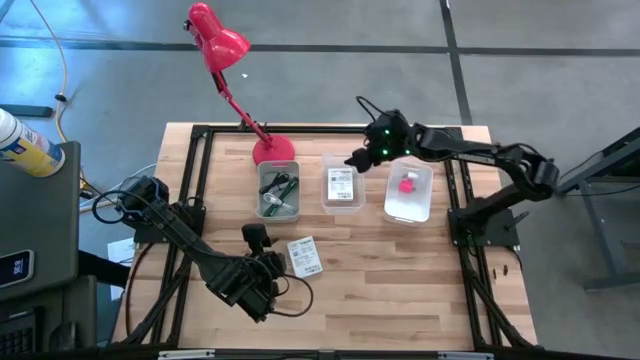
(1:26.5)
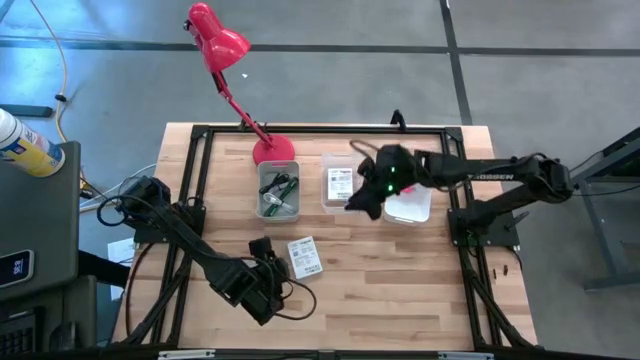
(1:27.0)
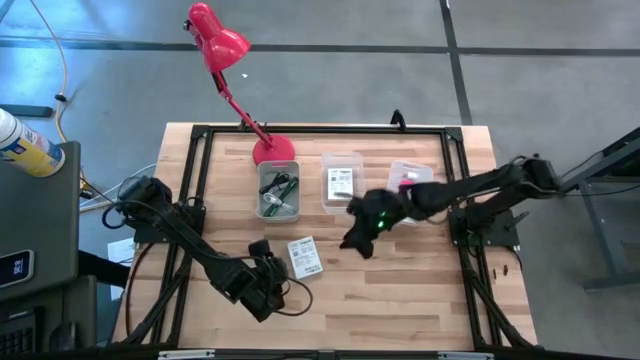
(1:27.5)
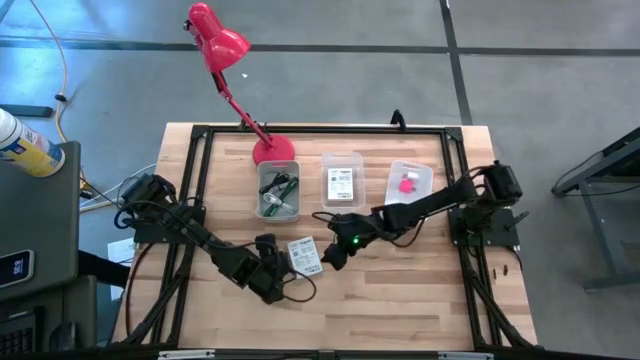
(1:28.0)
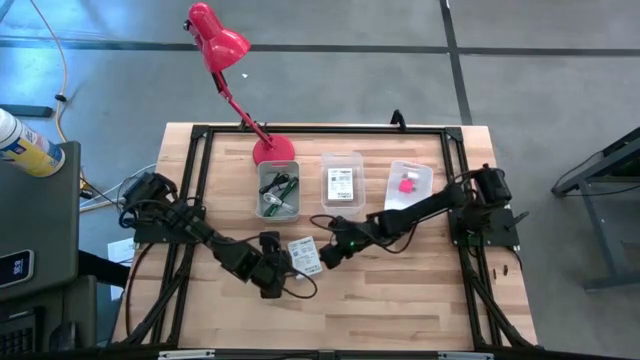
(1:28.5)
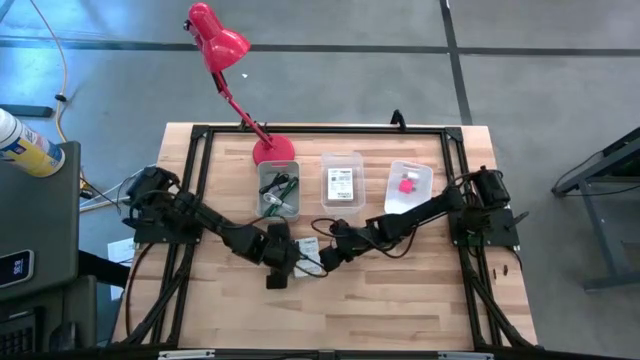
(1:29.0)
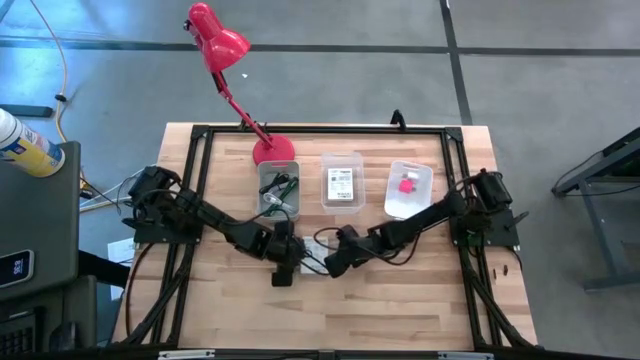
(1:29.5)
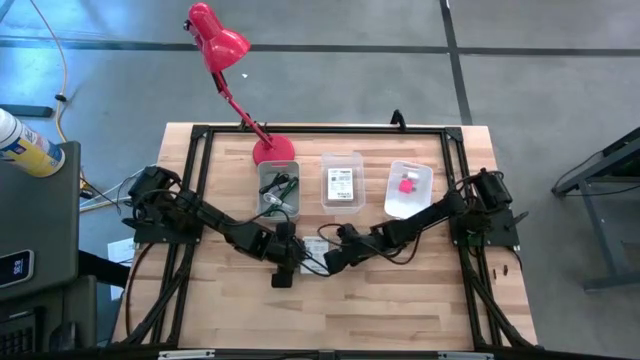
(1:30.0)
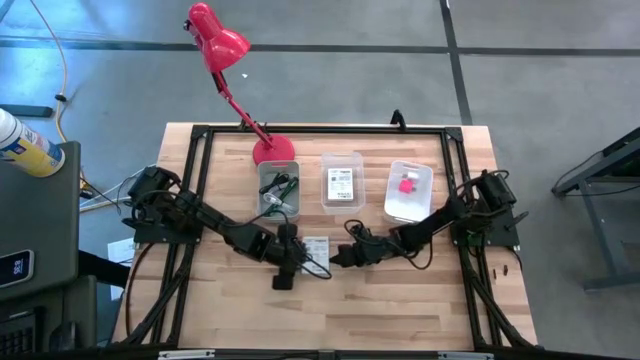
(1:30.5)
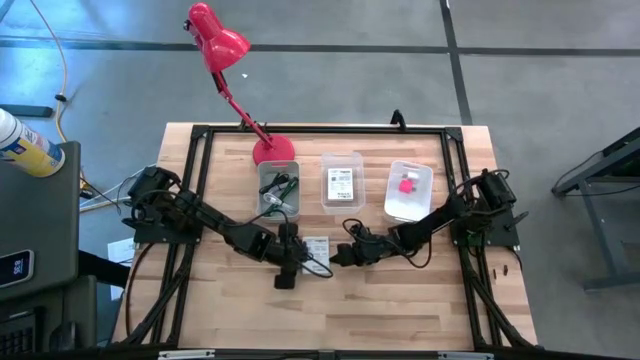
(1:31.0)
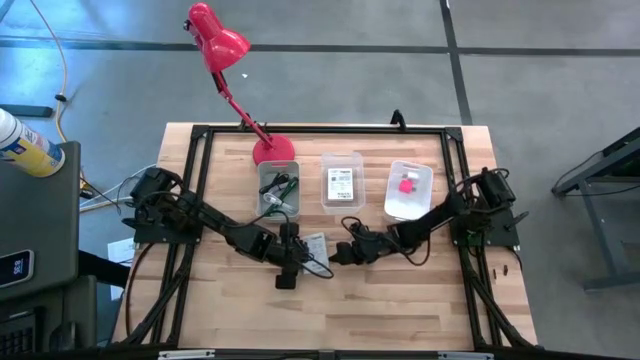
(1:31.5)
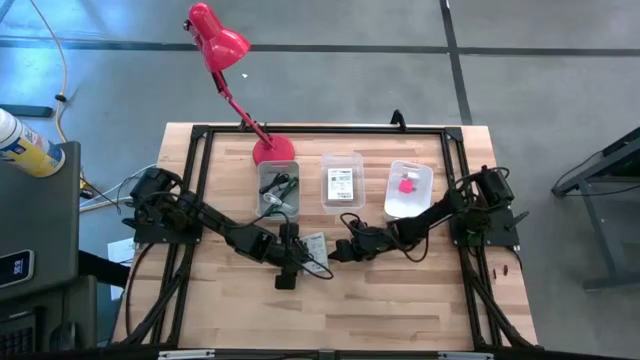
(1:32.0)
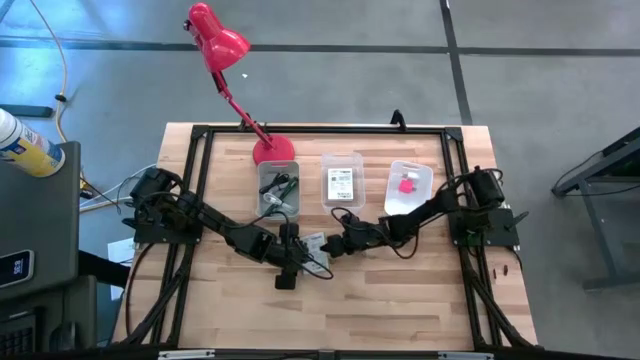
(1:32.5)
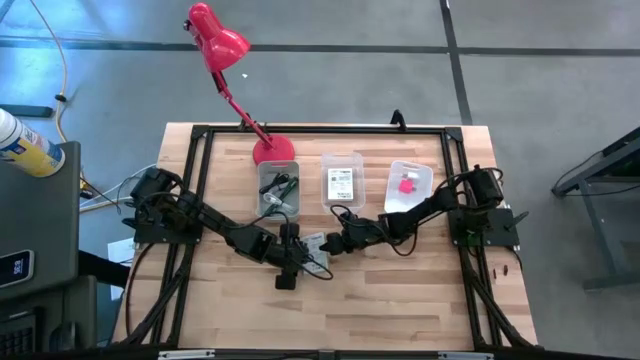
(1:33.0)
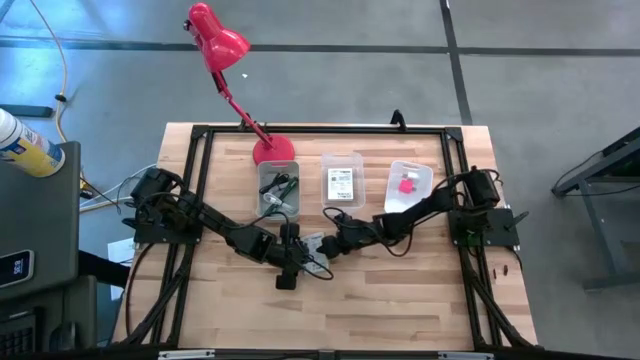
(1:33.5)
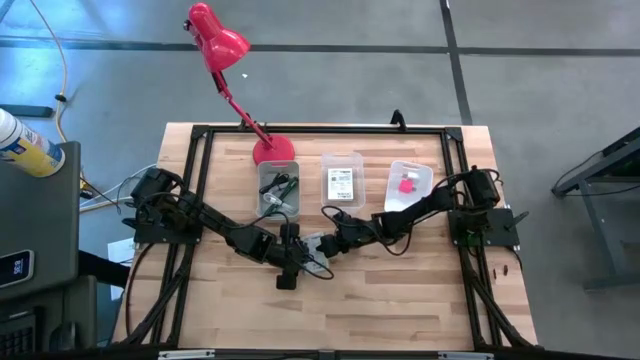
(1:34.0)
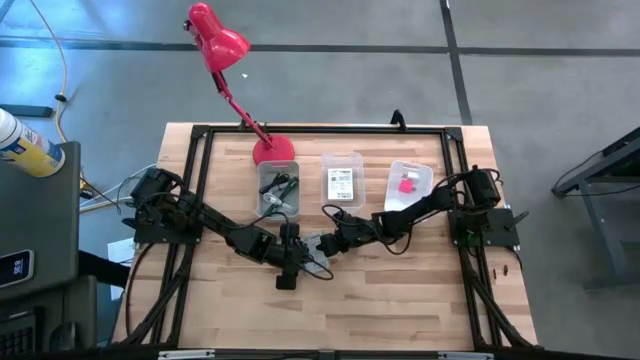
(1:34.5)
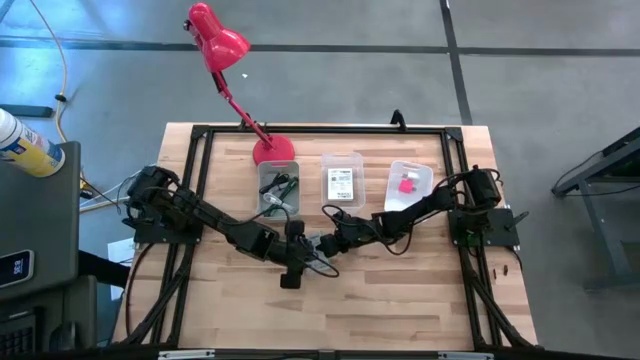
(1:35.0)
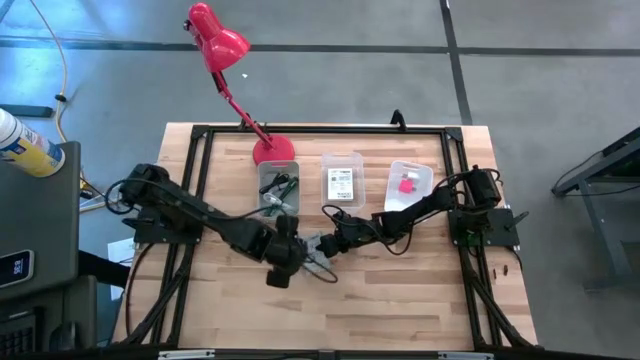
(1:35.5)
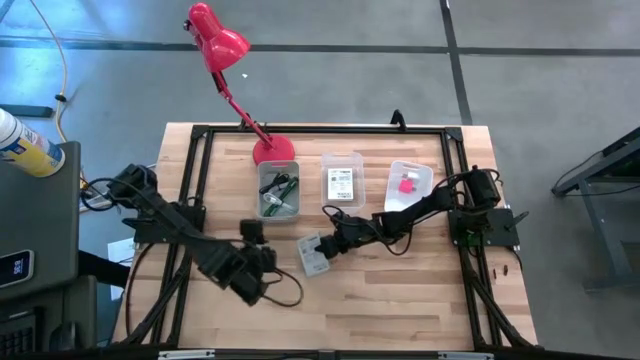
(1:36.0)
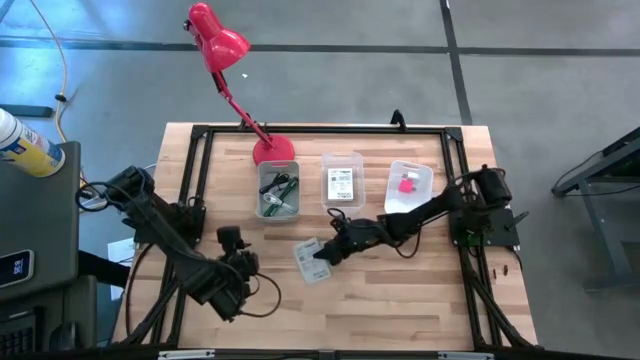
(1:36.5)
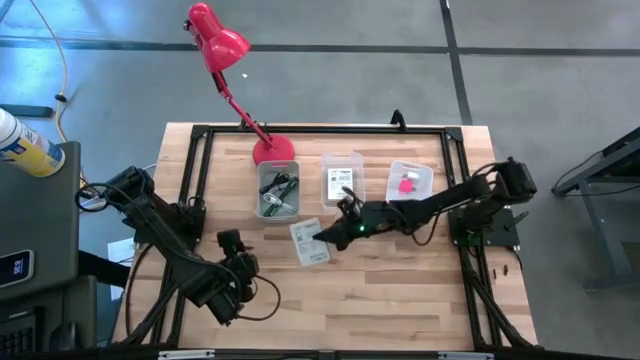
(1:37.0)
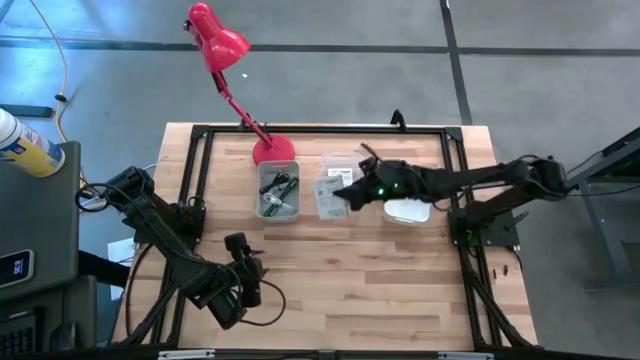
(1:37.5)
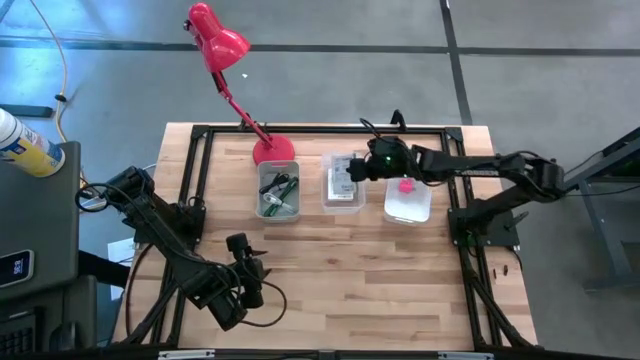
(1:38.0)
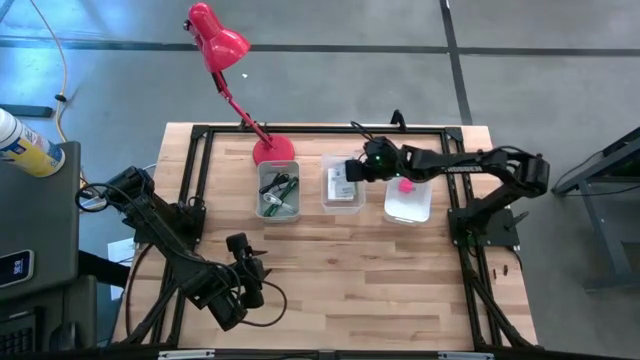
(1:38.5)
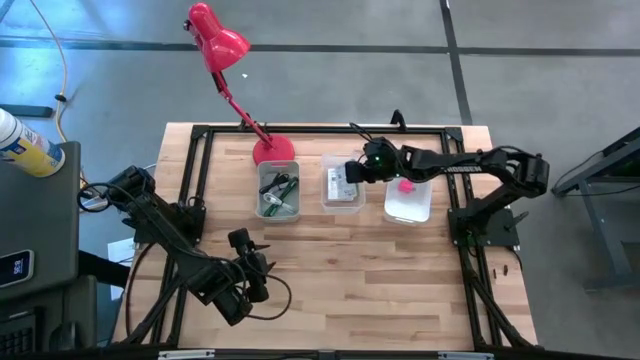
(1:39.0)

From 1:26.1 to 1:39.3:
Task: Pick and place items into bin
Return to Home Position

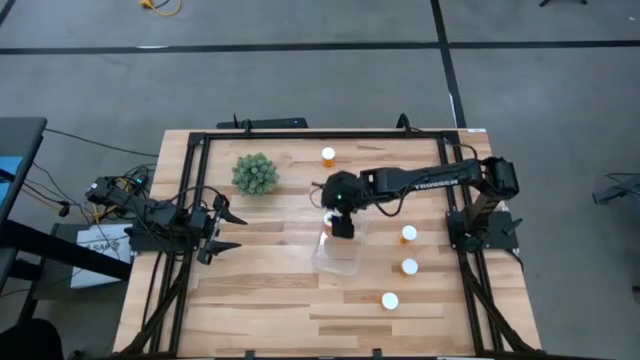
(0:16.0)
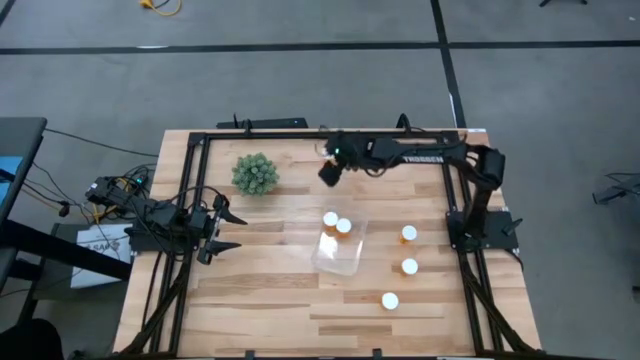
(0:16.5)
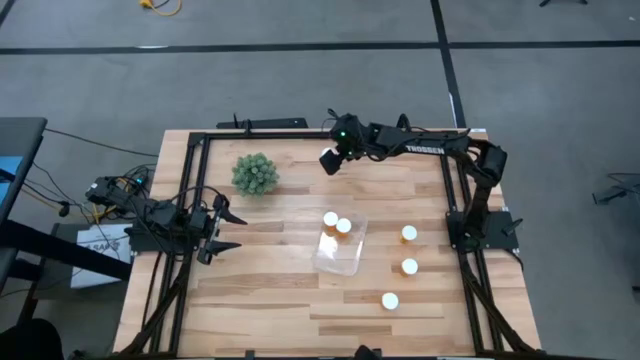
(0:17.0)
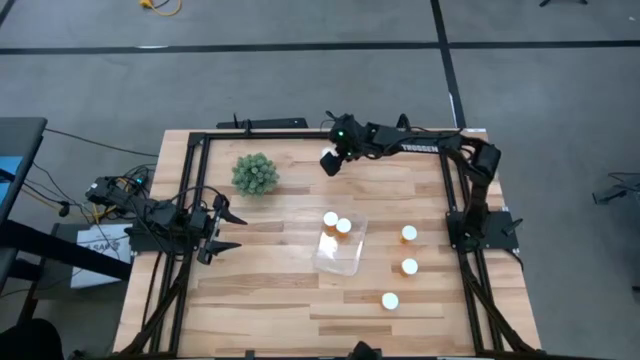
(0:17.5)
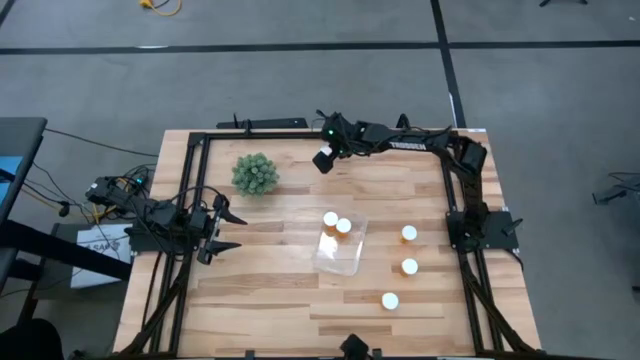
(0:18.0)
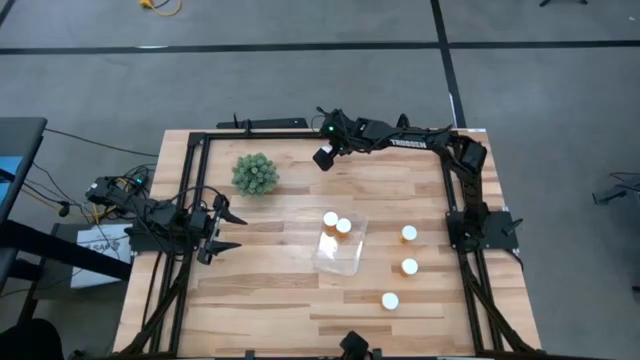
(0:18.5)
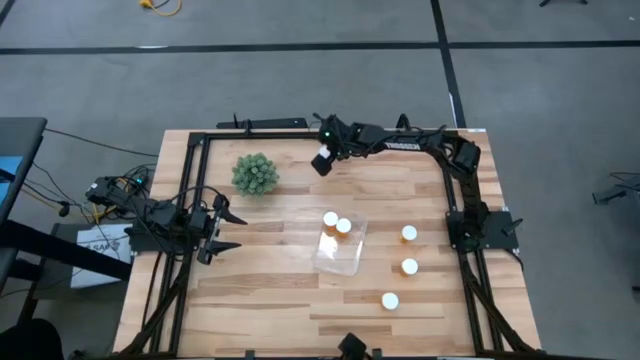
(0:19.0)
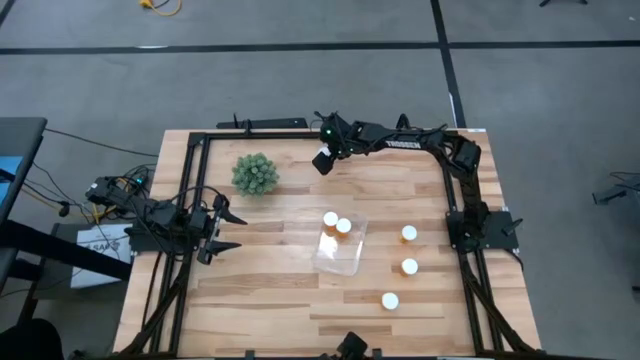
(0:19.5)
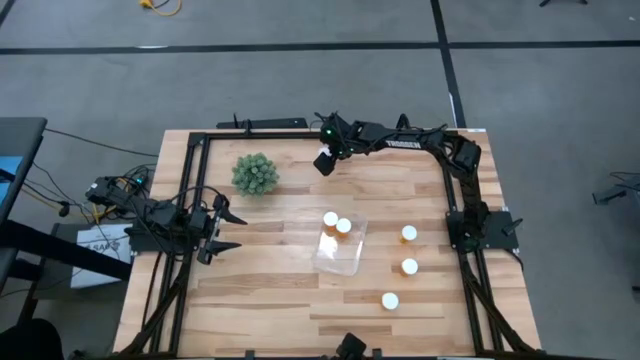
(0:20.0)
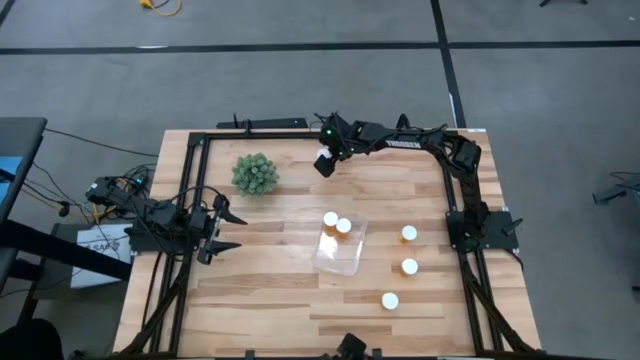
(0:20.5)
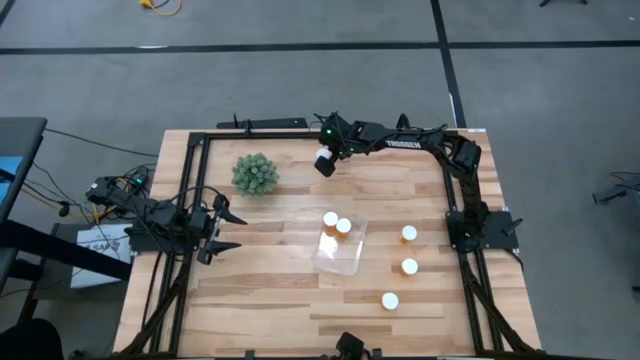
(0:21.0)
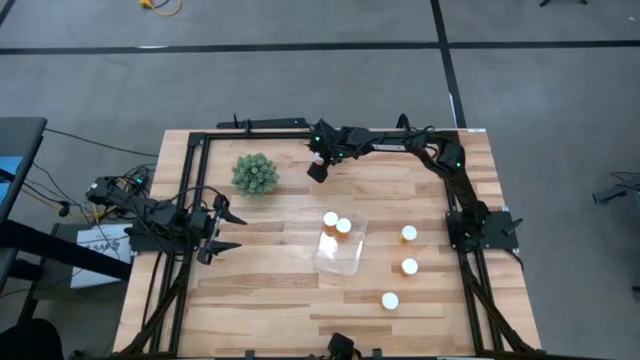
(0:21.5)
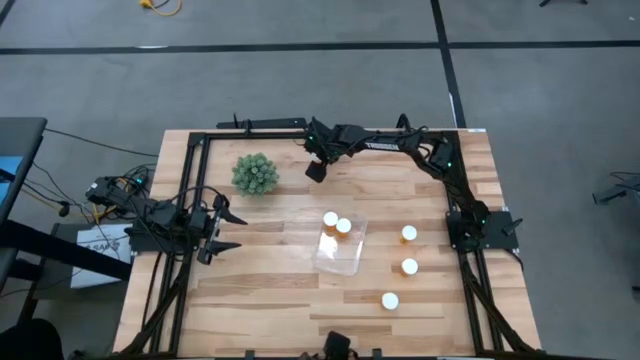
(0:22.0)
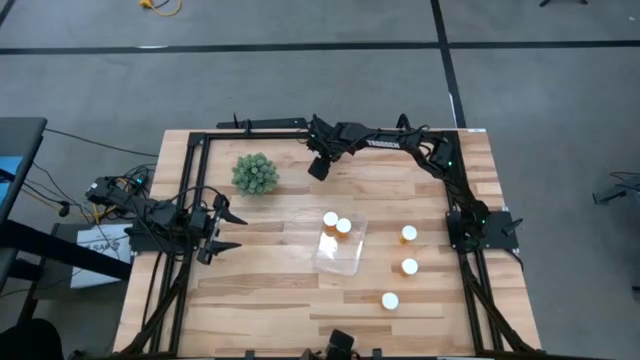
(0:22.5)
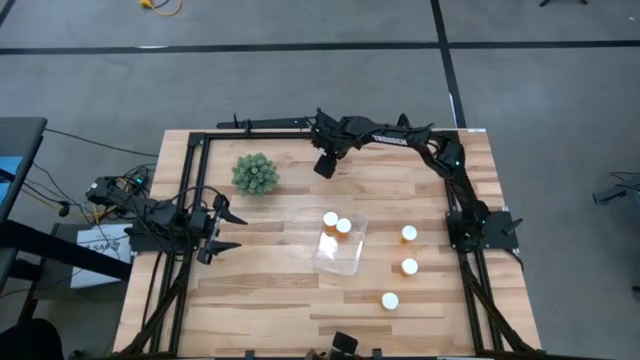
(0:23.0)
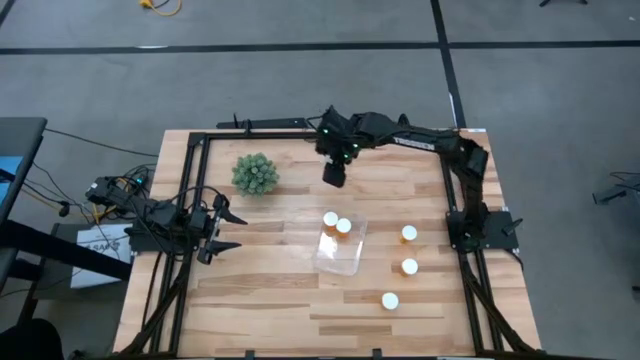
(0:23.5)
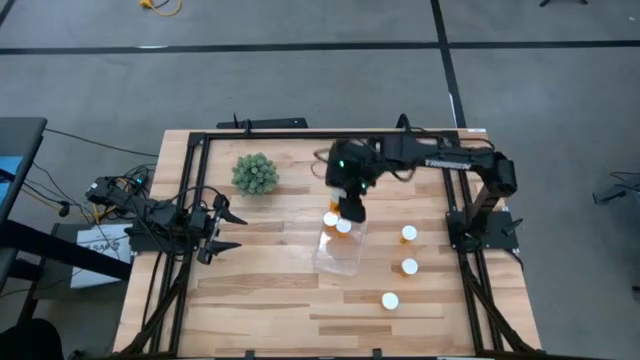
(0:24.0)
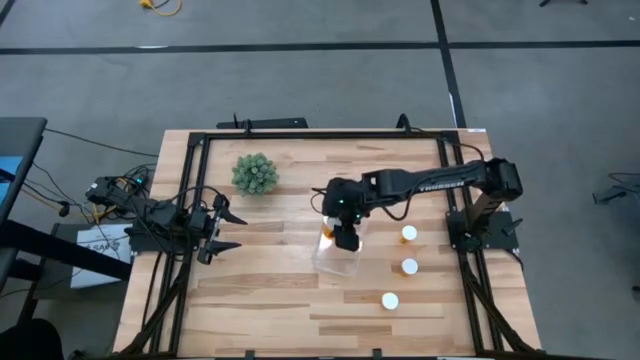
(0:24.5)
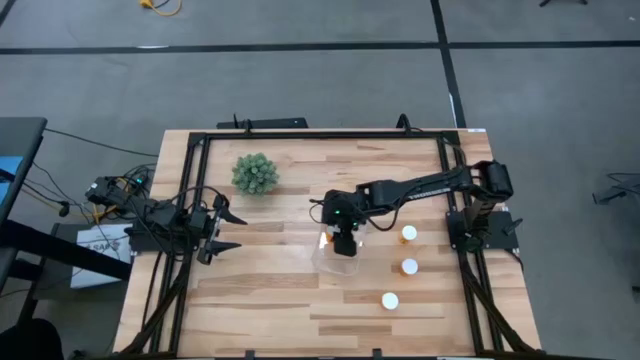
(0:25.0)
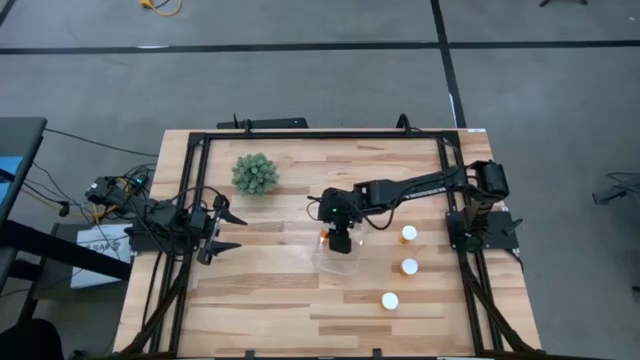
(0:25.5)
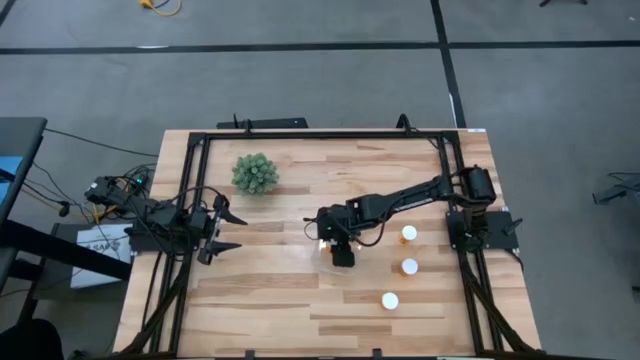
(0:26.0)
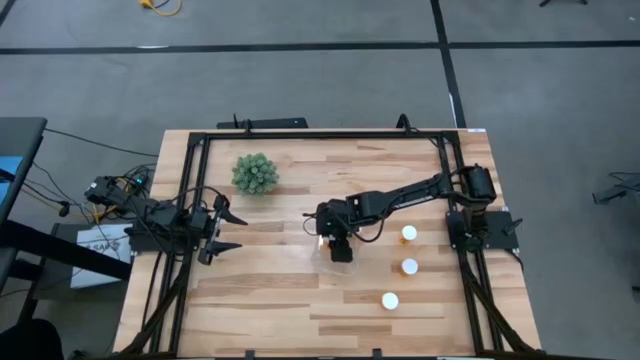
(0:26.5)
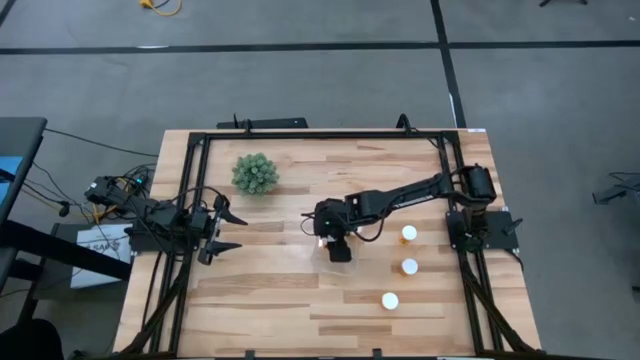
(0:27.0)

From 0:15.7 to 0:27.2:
Task: Pick and place pill bottles into a basket
Put the orange medicine bottle into the transparent bin
